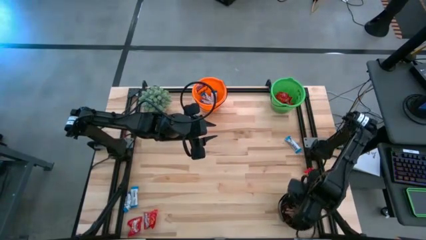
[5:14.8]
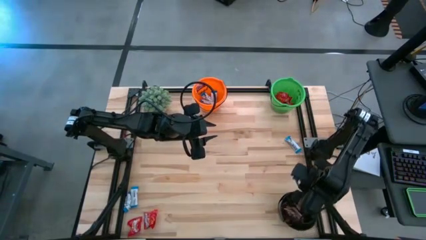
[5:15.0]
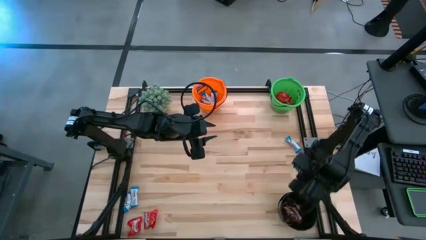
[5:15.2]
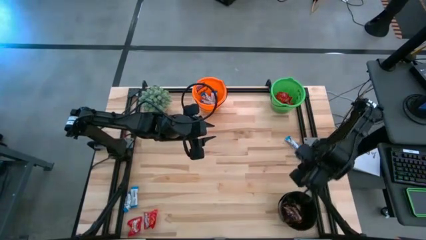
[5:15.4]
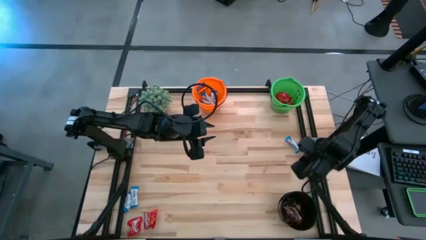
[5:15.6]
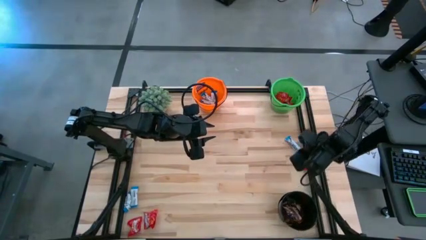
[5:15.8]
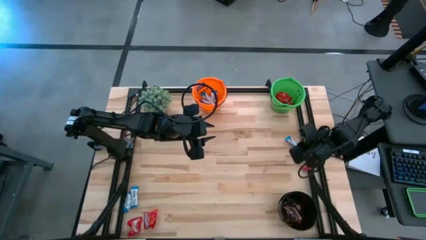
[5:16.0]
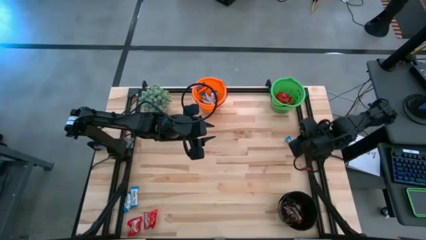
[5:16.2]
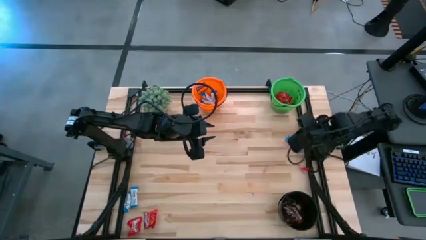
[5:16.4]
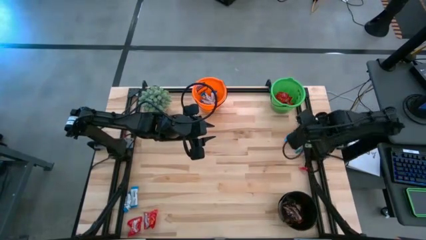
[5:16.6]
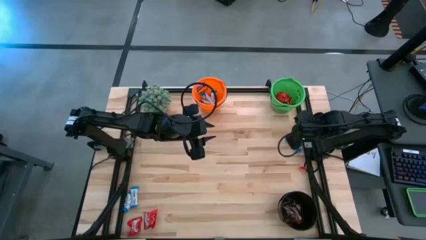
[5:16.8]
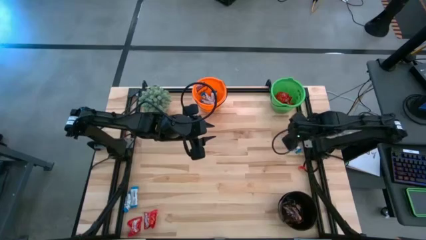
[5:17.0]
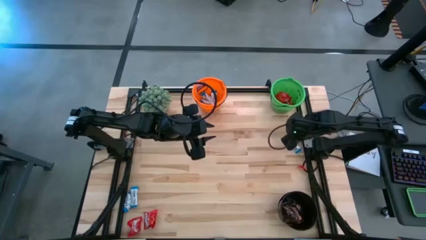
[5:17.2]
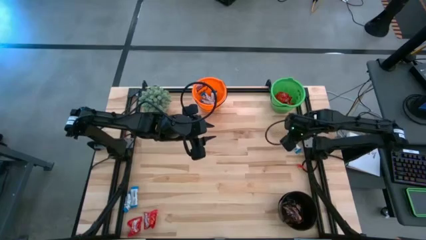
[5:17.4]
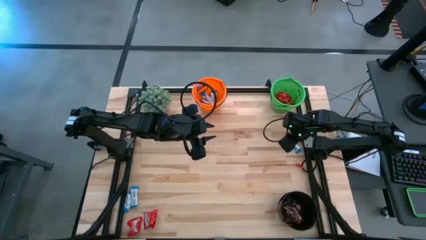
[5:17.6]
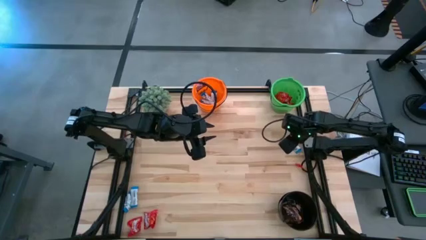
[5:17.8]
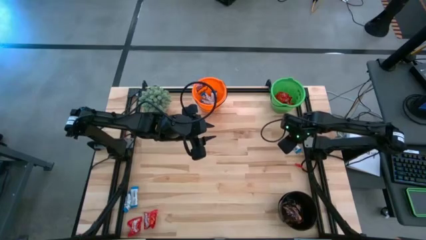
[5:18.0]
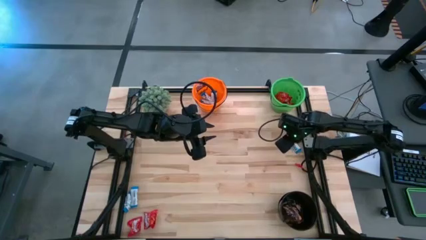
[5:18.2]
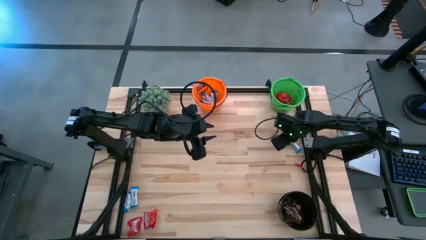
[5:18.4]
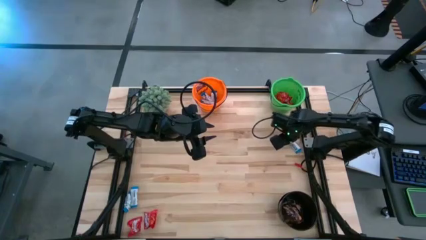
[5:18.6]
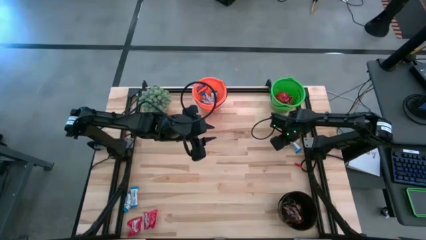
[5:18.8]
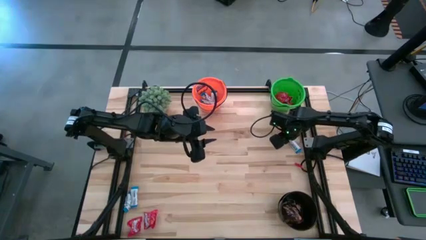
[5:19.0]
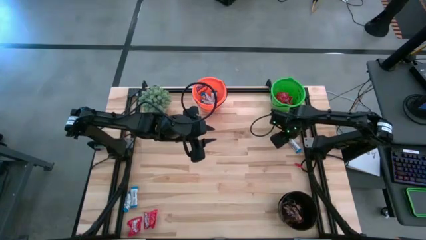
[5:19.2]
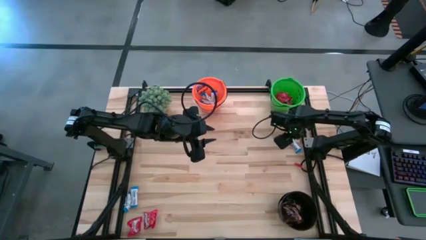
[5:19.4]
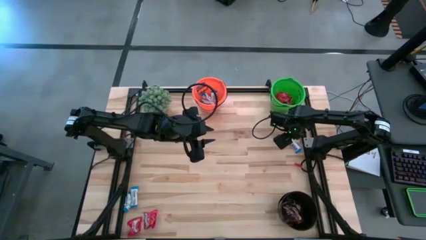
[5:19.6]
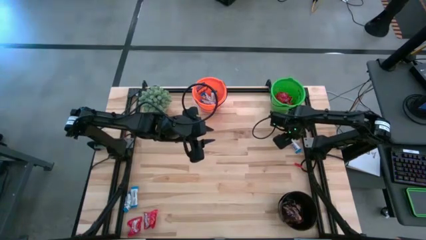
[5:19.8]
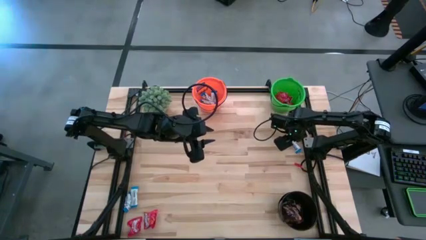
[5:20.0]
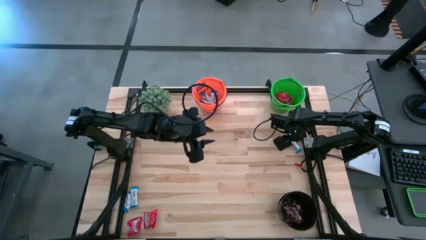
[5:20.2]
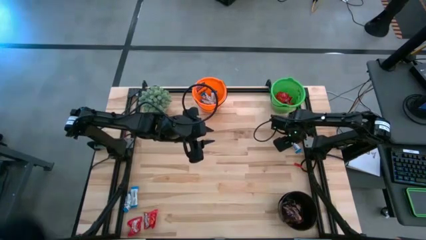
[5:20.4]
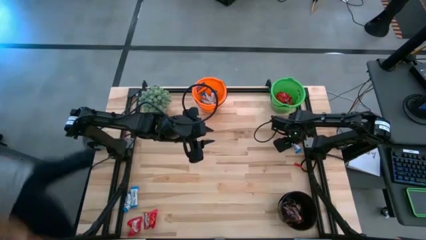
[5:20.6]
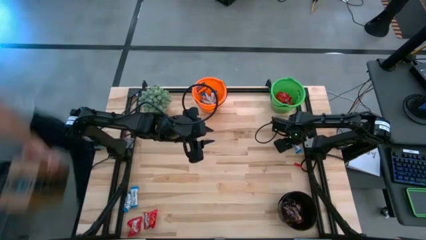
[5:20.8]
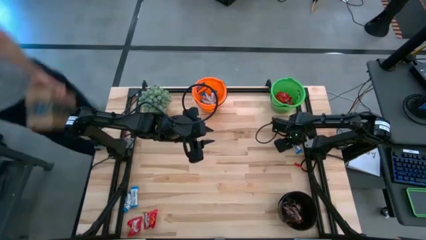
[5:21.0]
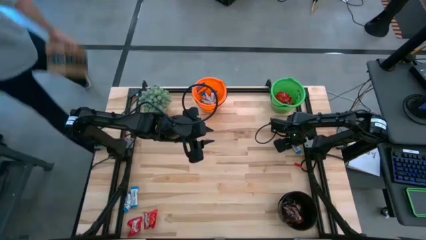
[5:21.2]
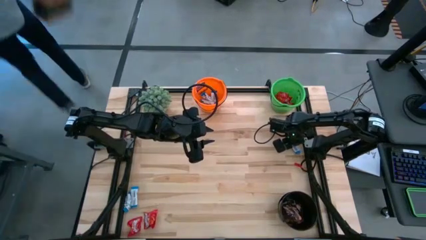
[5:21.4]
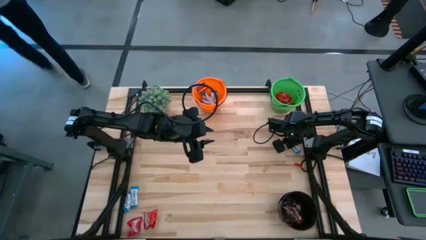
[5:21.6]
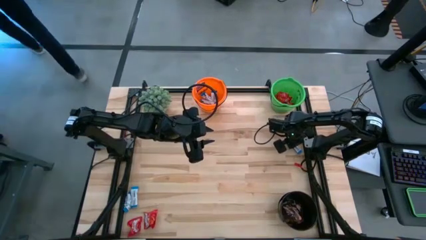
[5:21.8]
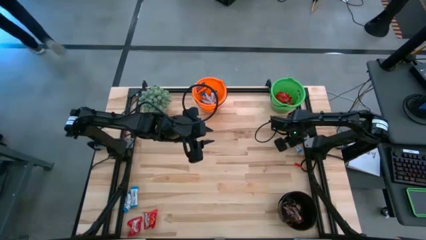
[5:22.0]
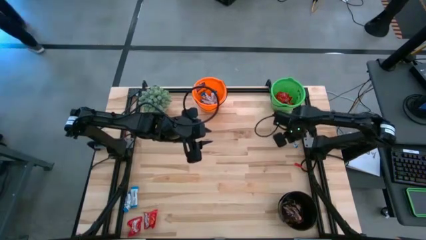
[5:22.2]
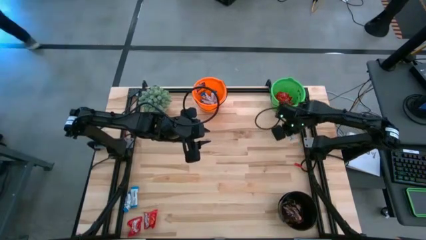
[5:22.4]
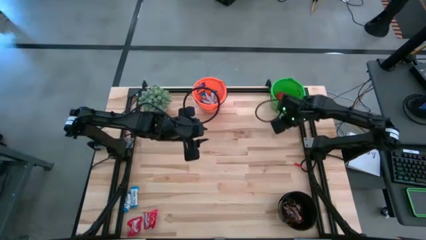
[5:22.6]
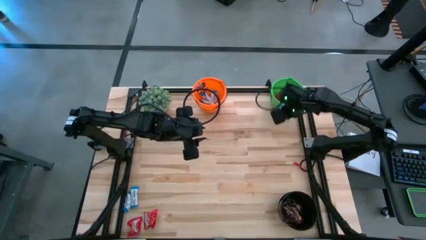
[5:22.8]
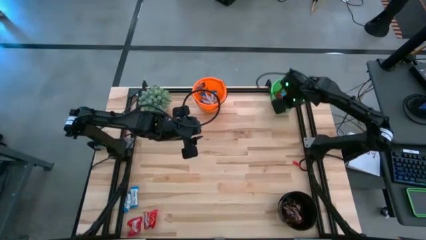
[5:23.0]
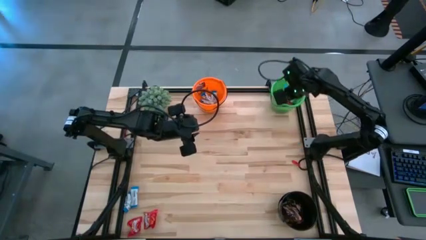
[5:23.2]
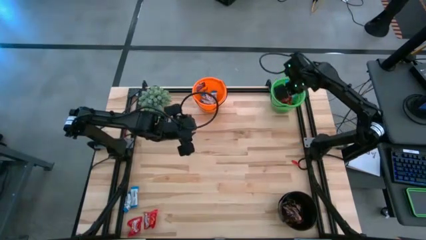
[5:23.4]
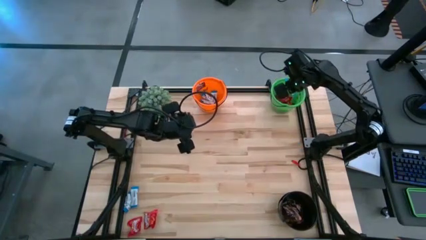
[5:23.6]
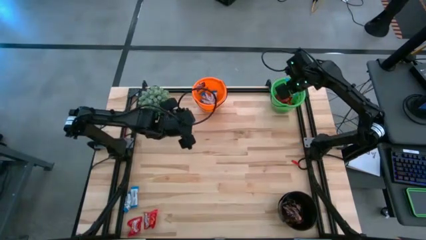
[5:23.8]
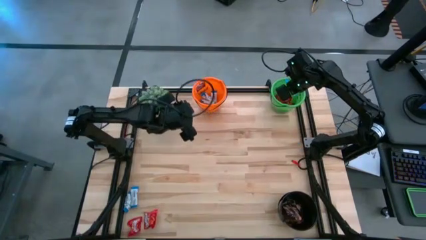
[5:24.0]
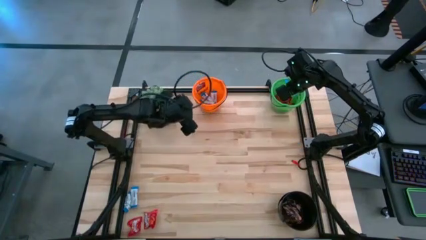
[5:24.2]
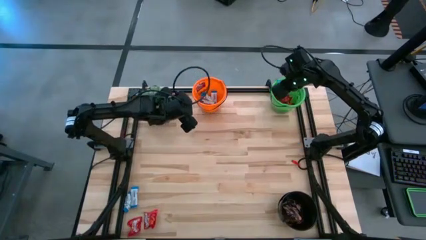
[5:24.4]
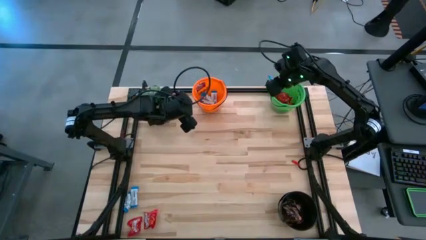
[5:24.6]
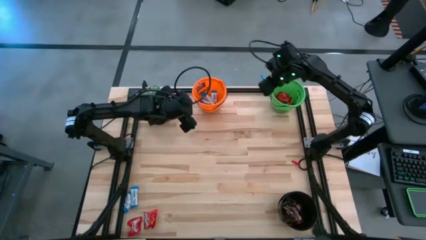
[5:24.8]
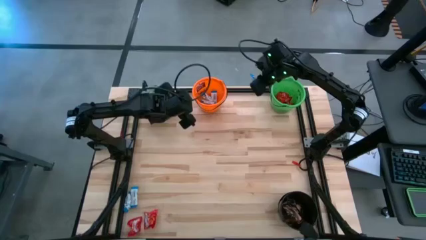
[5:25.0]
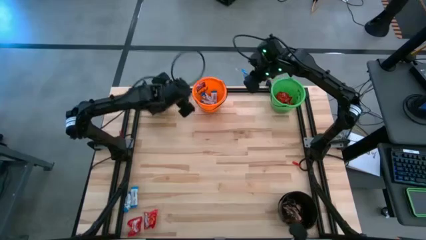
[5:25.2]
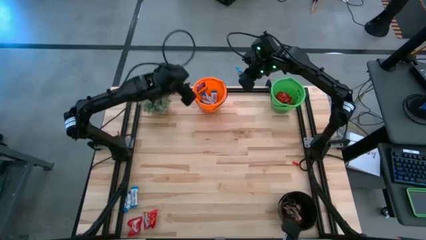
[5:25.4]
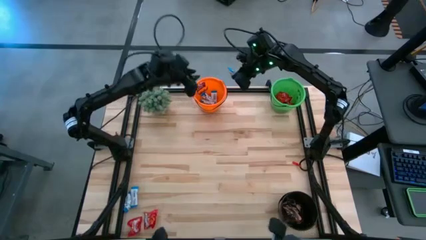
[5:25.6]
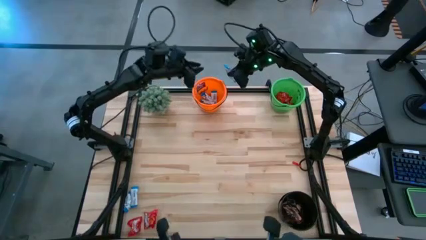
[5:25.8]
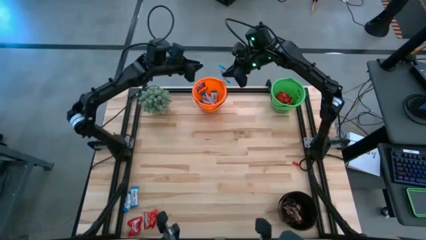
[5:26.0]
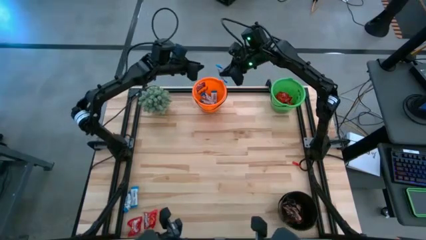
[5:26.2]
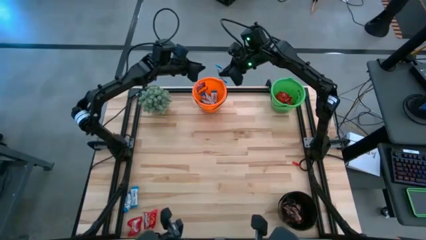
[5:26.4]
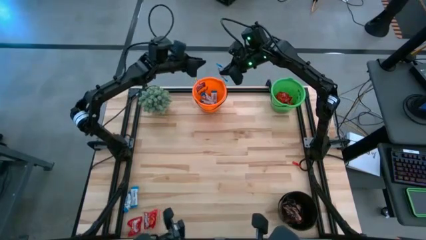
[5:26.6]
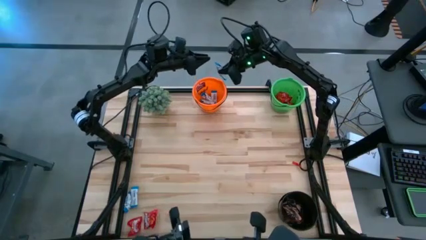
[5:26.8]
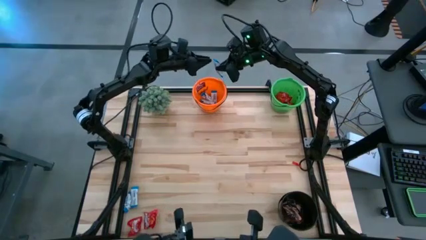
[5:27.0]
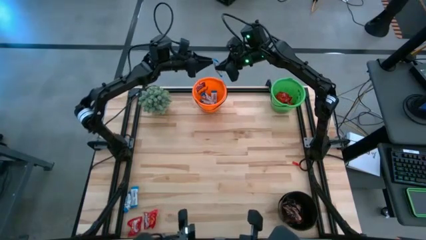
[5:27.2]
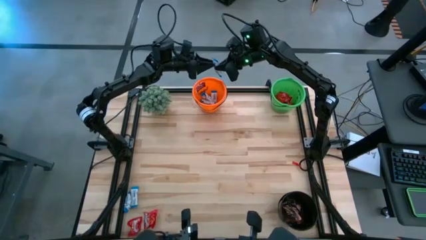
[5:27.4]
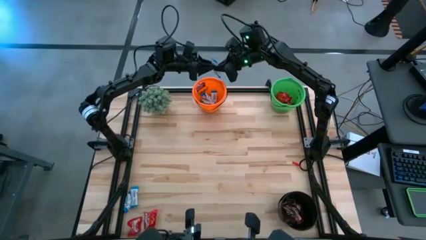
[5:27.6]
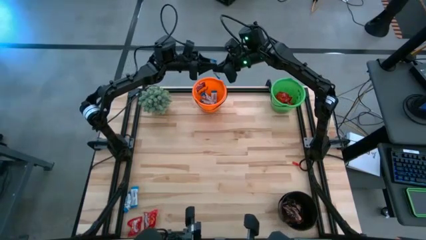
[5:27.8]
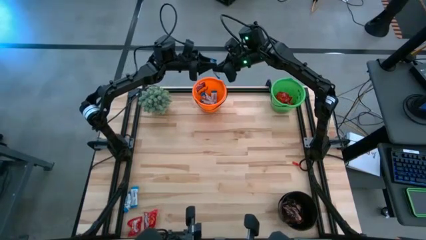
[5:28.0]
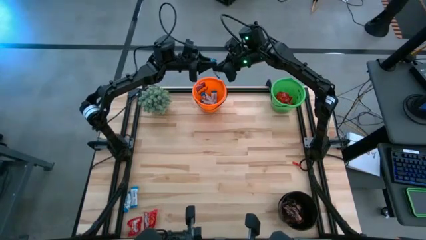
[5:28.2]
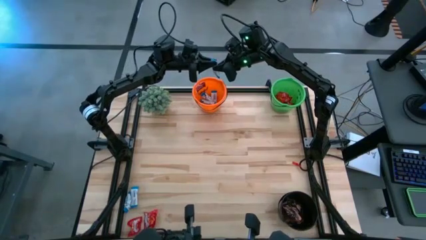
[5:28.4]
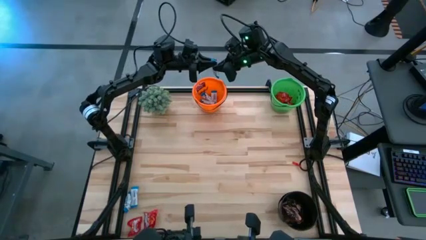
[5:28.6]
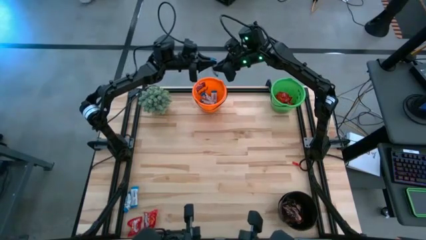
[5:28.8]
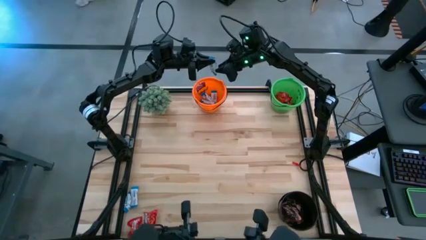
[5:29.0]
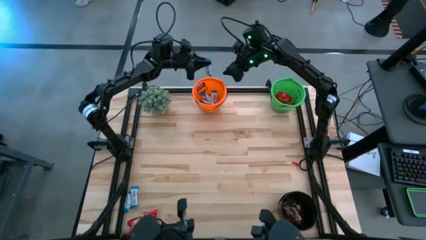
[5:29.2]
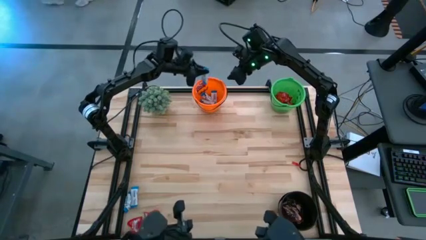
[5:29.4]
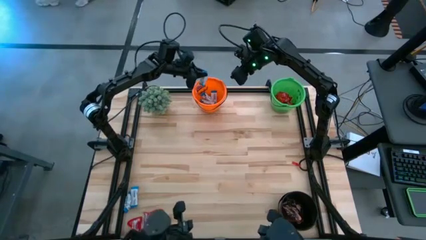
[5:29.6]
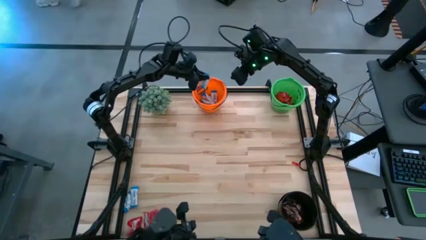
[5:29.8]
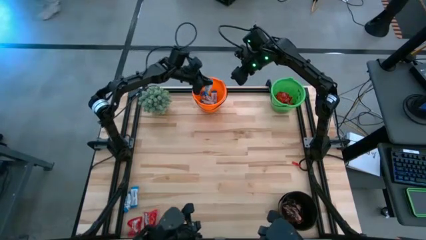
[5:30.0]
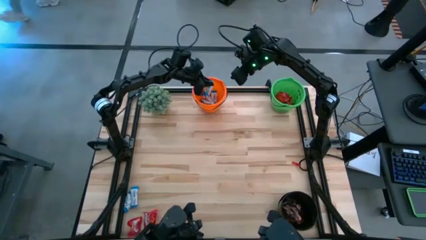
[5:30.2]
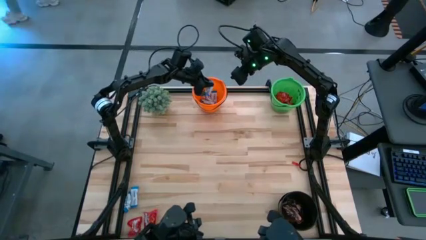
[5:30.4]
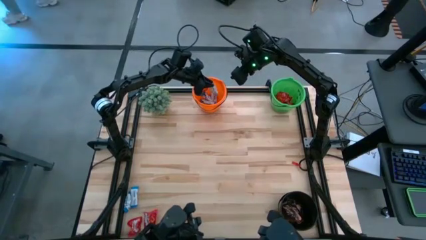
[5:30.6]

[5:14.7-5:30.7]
Task: Organize candy in baskets
Put the white chocolate bar into the orange bucket
